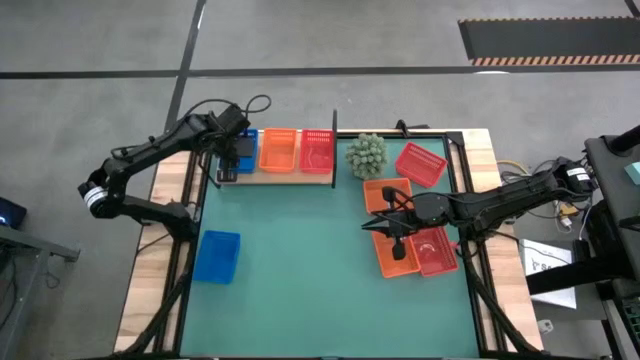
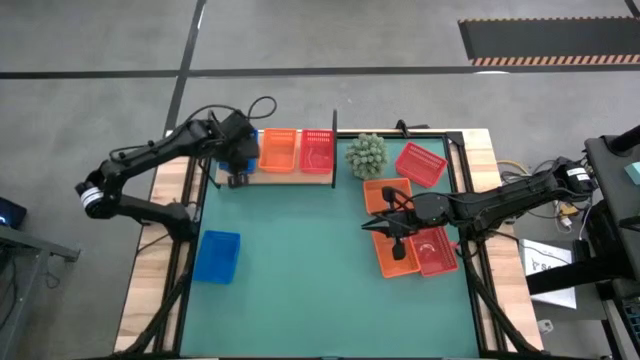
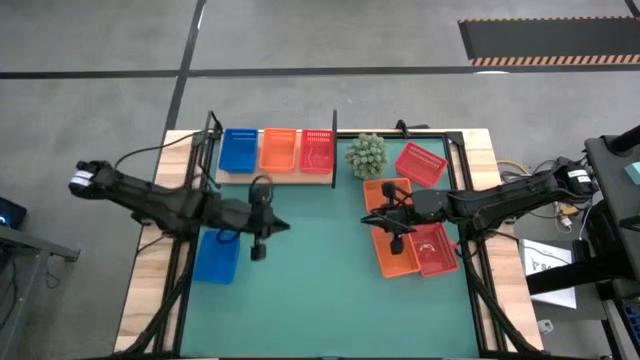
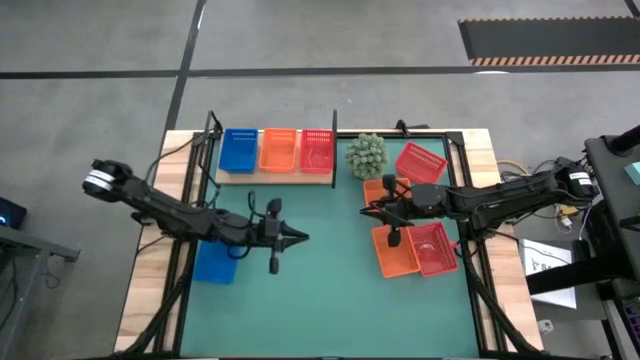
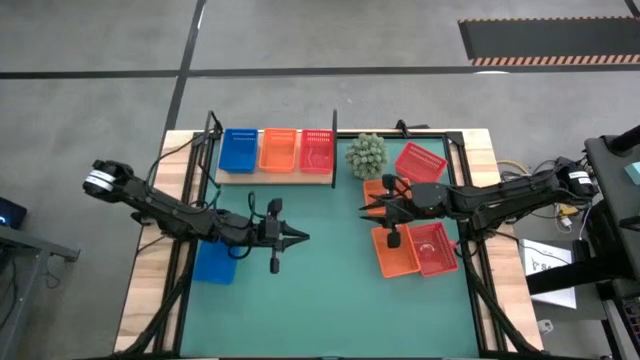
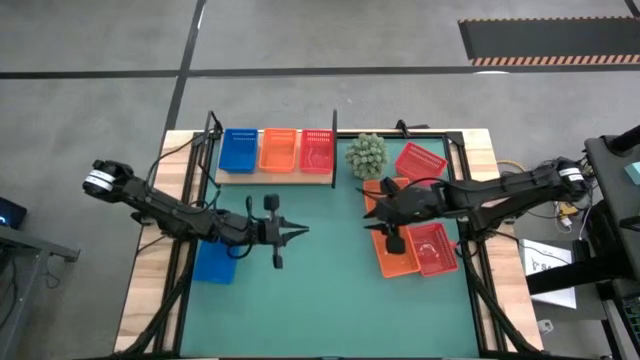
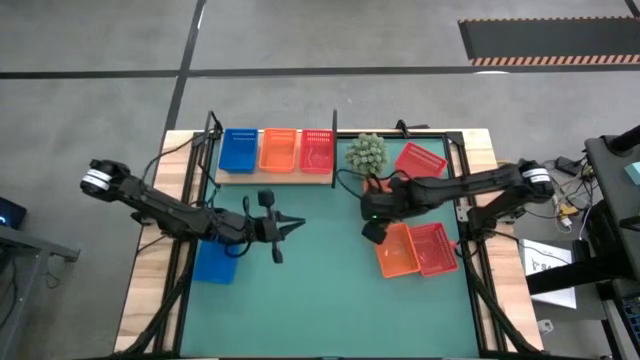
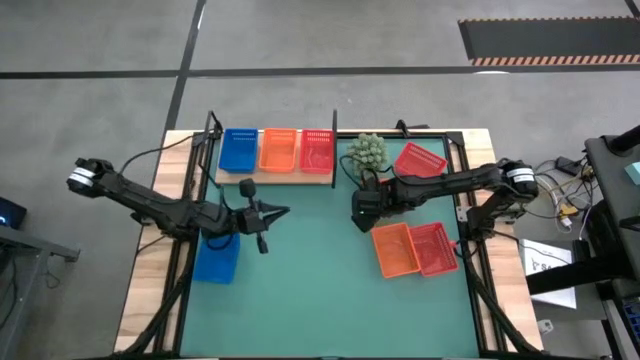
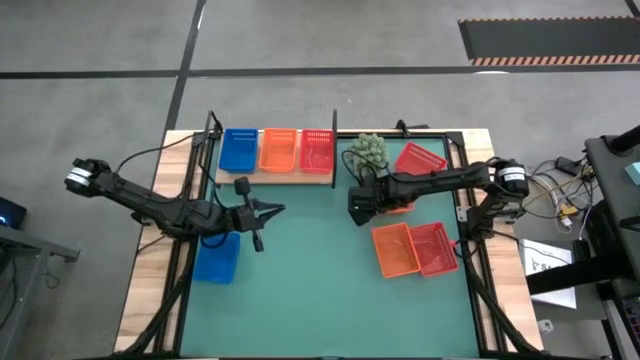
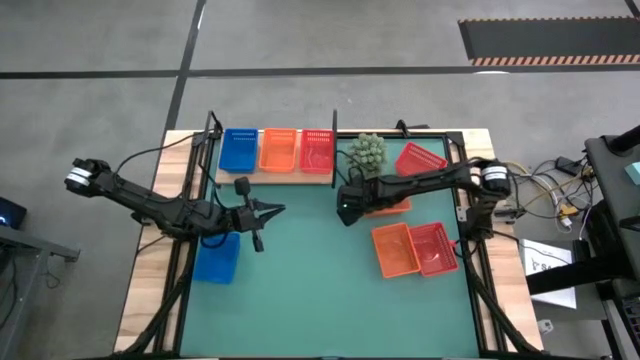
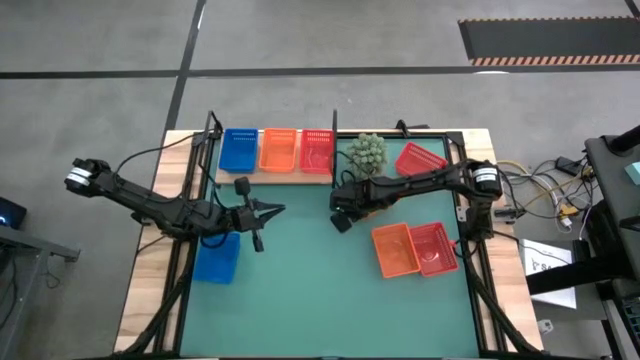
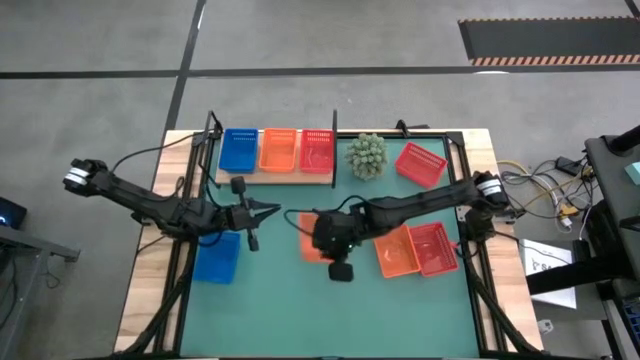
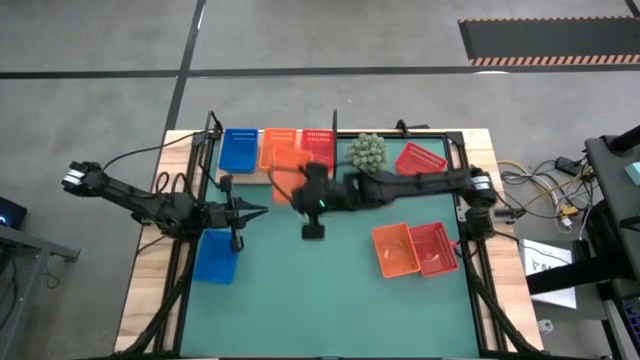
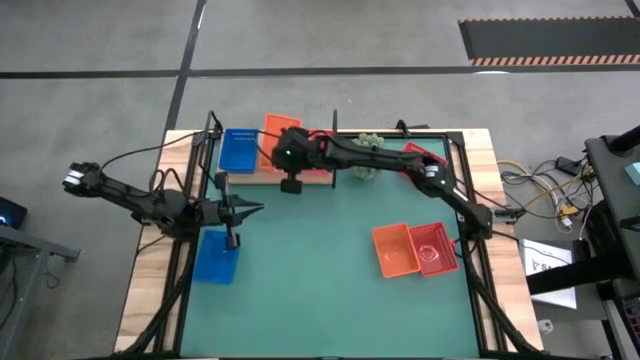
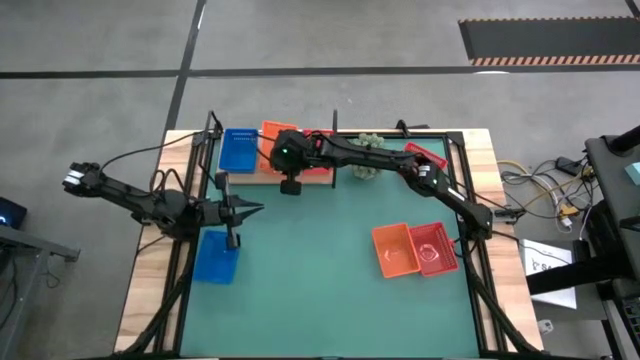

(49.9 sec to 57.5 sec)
Task: Stack baskets on shelf by color
Stack the top orange bin on the orange bin on the shelf

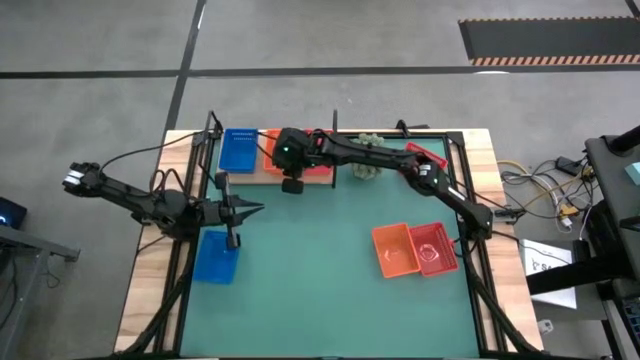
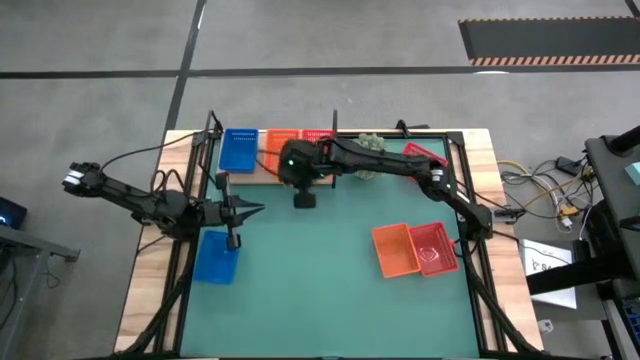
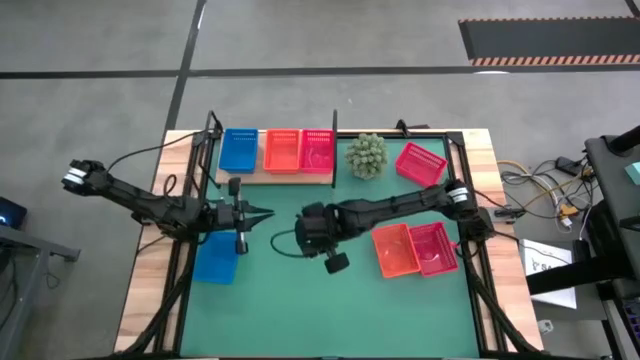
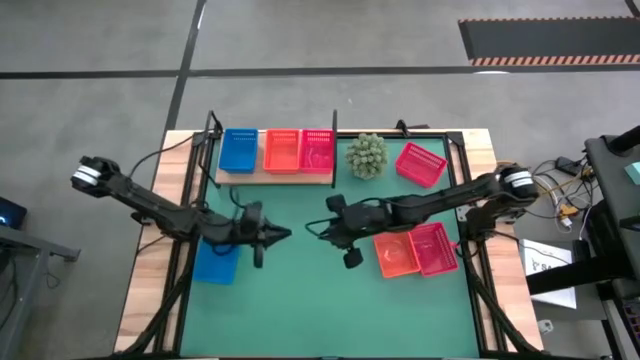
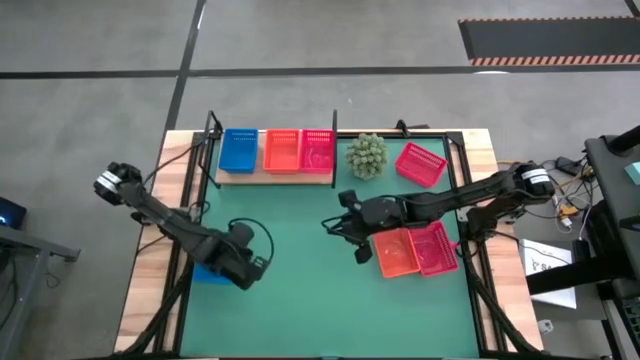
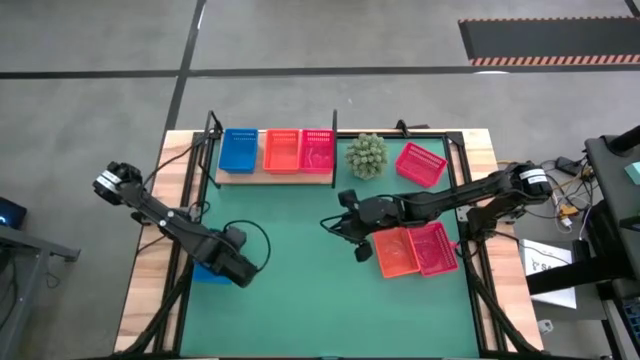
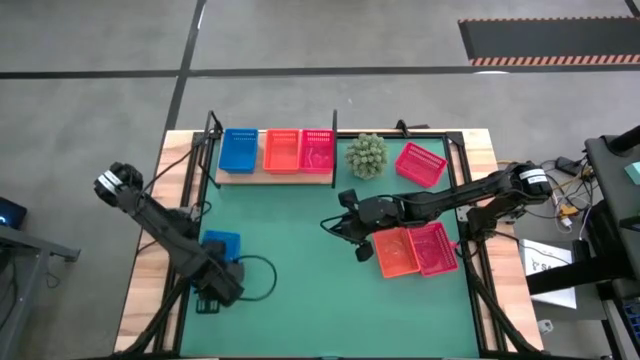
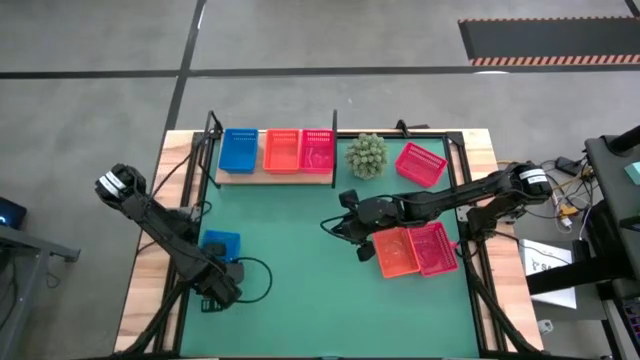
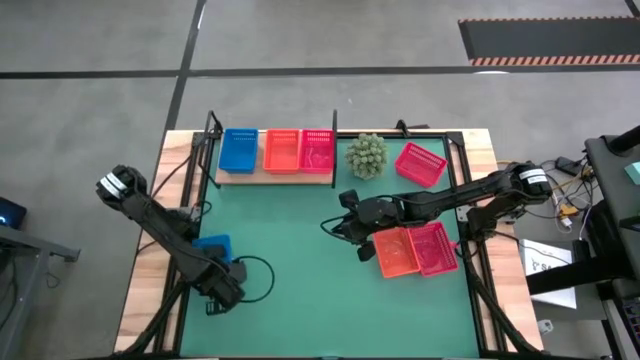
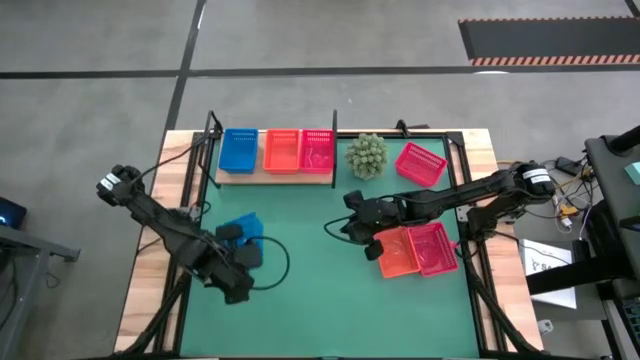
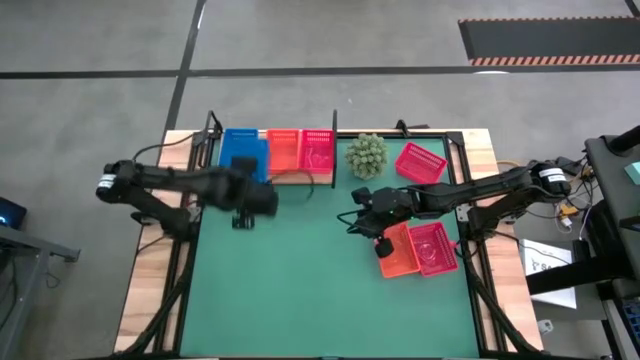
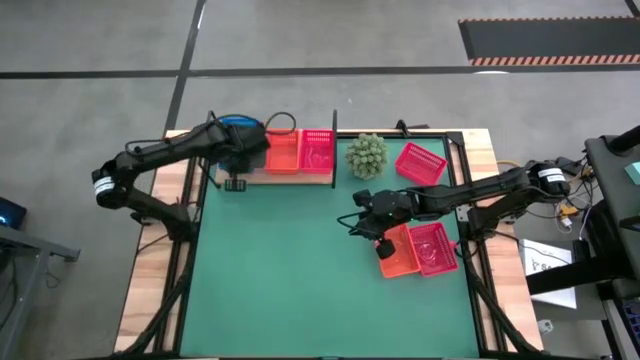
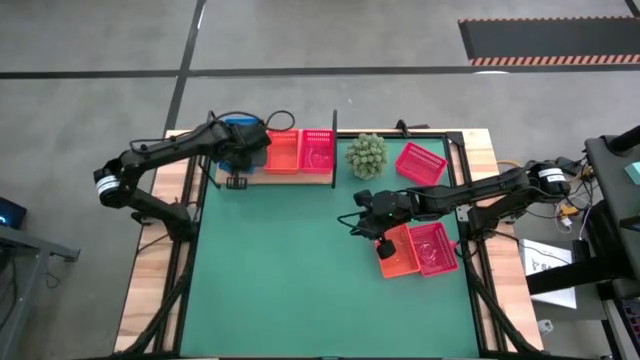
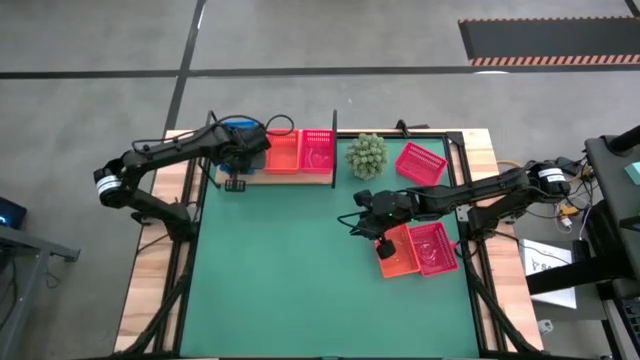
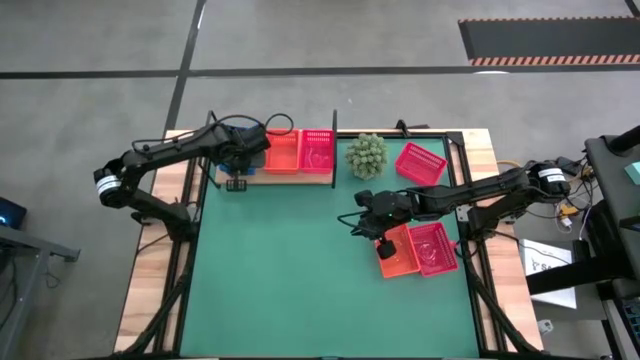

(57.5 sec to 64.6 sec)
Stack the blue bin on the blue bin on the shelf

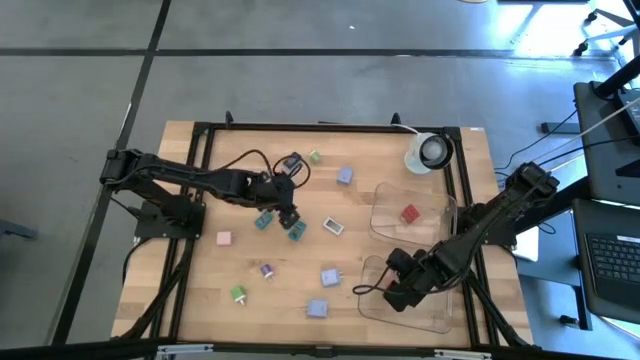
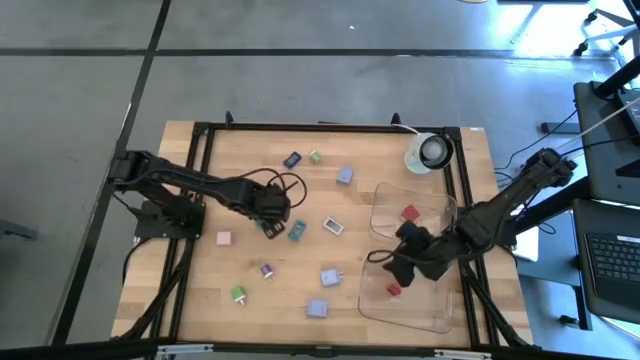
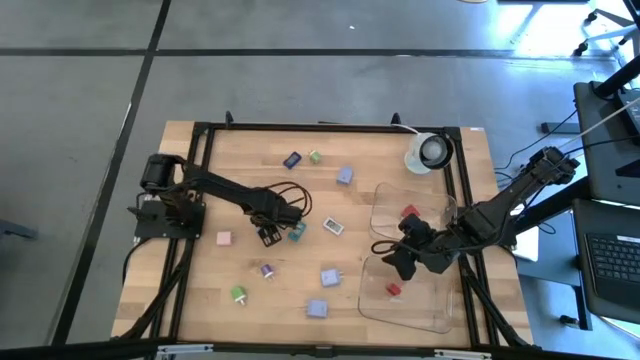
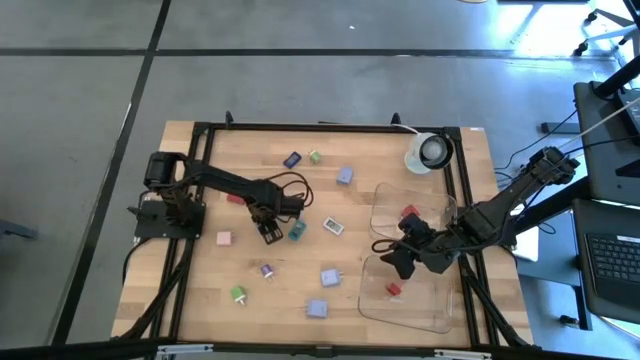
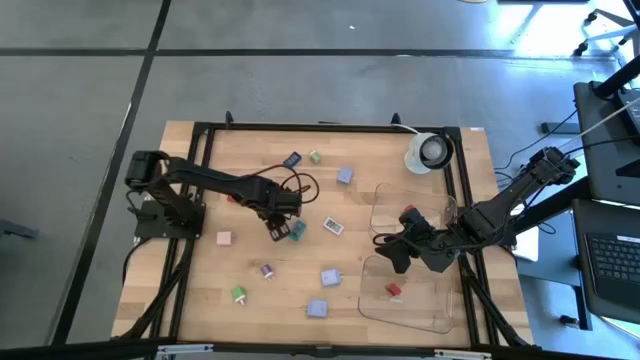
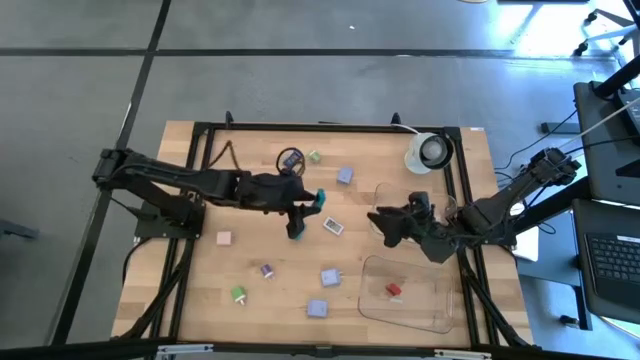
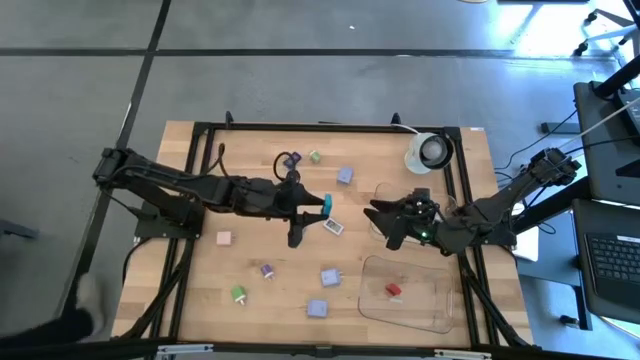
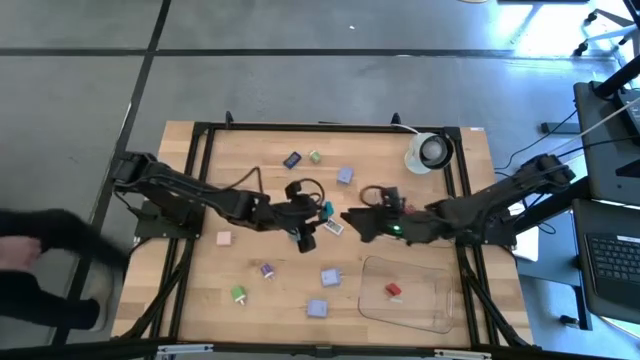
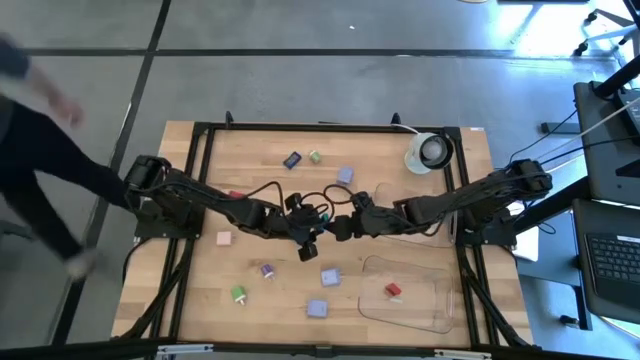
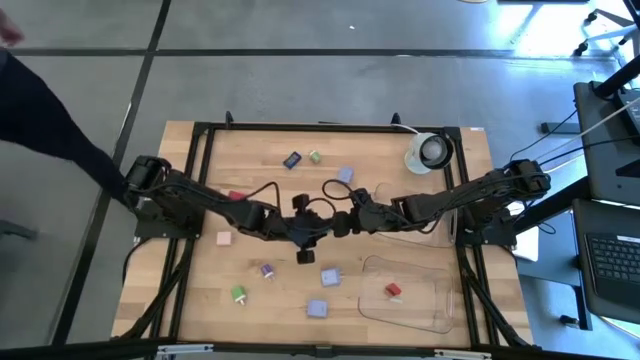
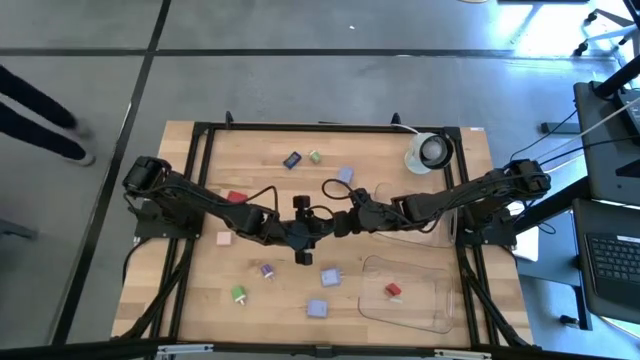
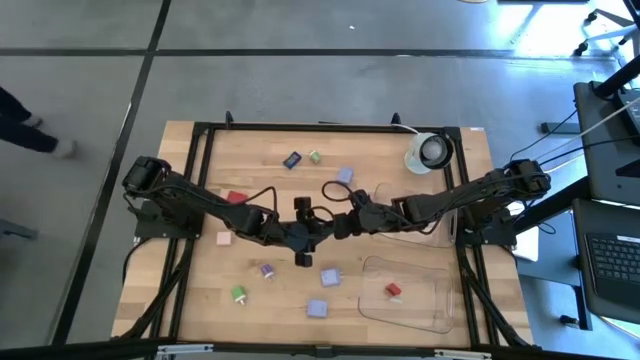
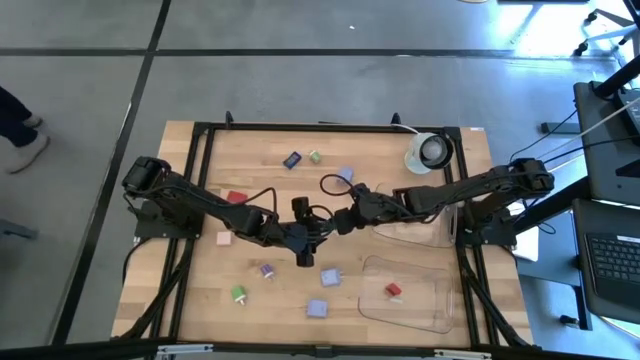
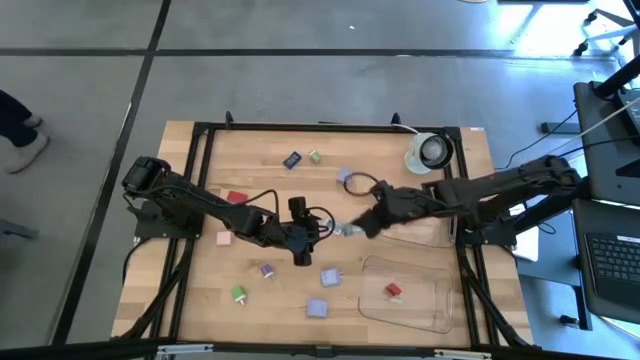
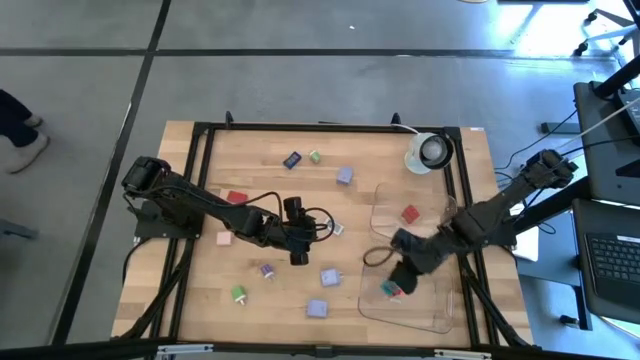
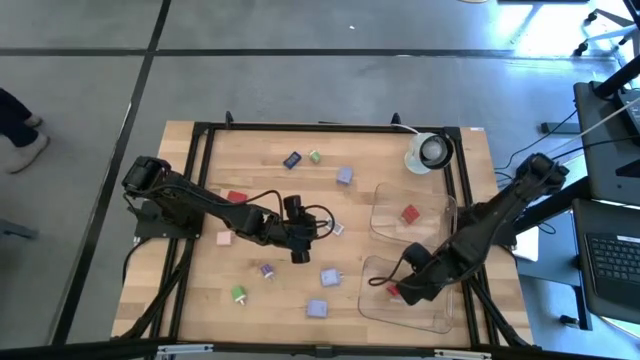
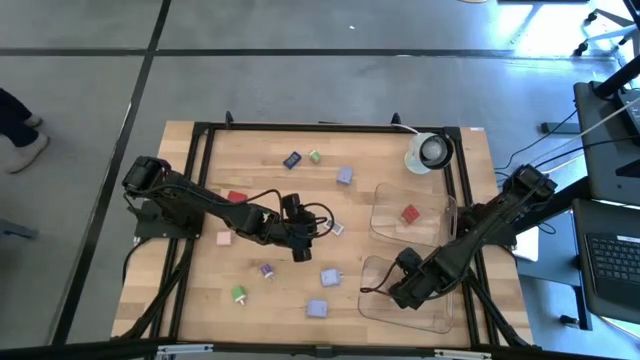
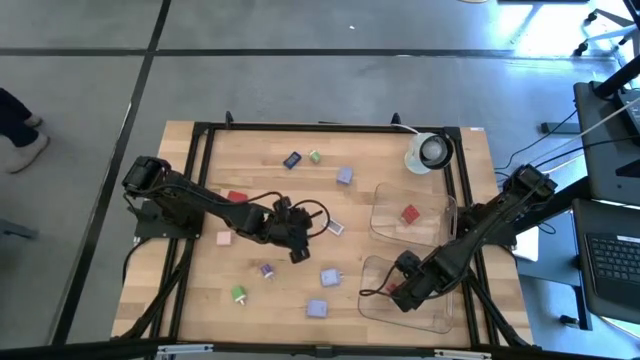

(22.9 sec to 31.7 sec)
Task: Pick & Place Office items
Put the left blue digital timer into the bottom transparent bin
